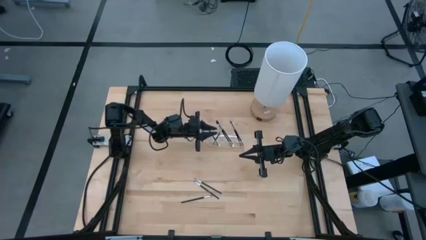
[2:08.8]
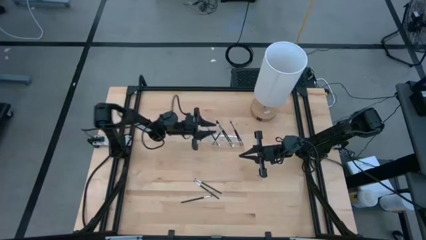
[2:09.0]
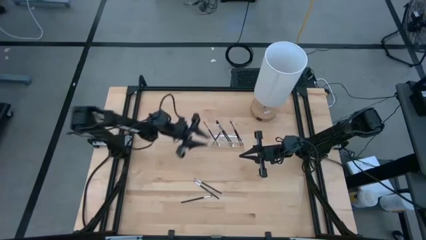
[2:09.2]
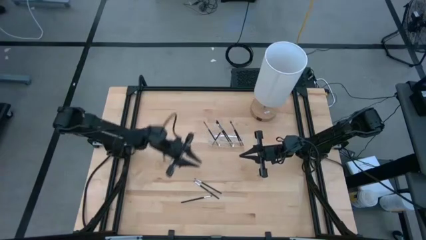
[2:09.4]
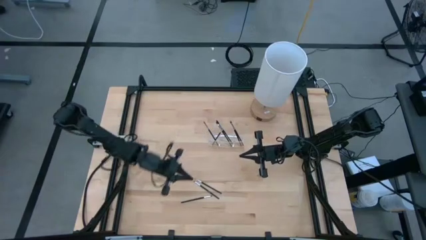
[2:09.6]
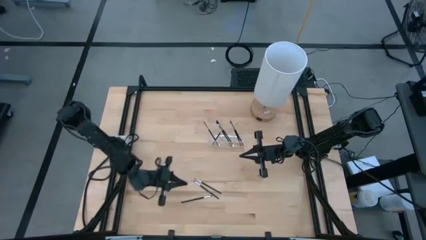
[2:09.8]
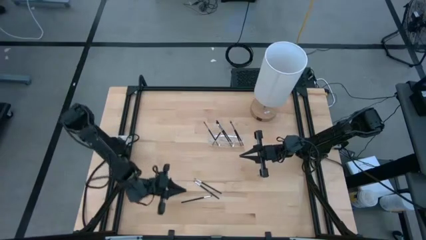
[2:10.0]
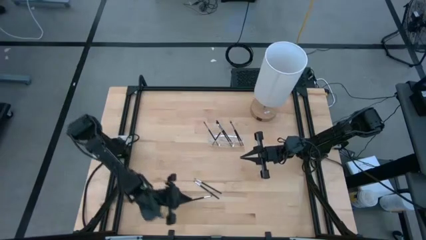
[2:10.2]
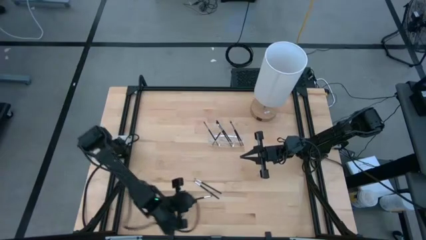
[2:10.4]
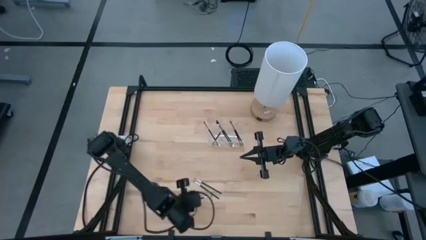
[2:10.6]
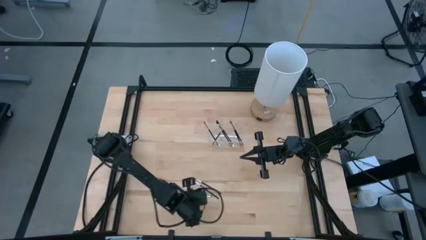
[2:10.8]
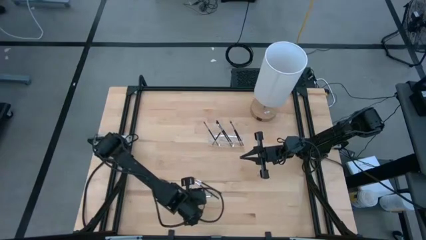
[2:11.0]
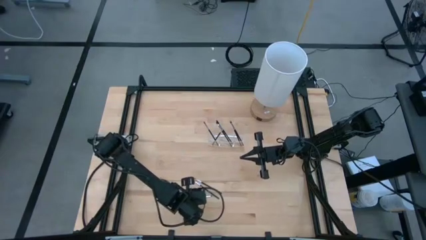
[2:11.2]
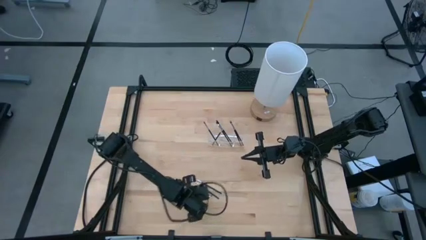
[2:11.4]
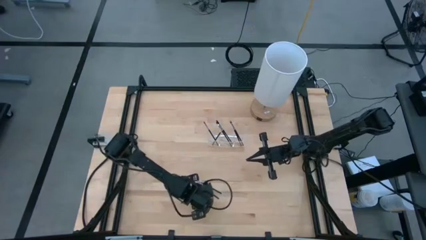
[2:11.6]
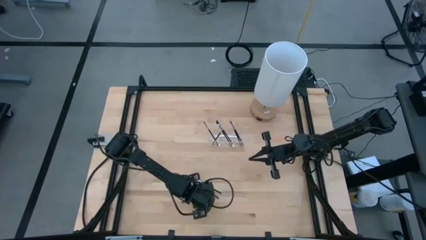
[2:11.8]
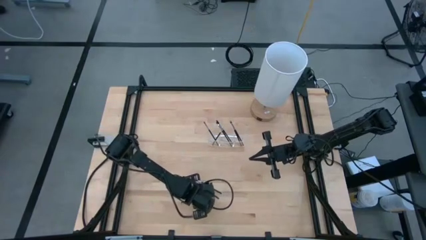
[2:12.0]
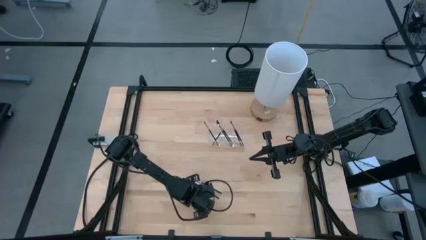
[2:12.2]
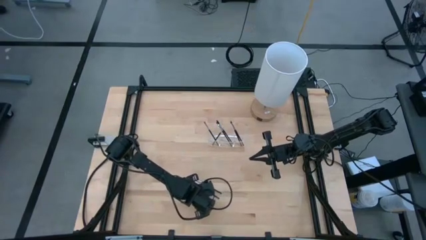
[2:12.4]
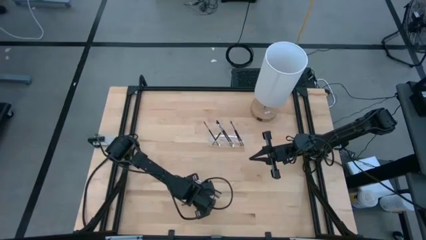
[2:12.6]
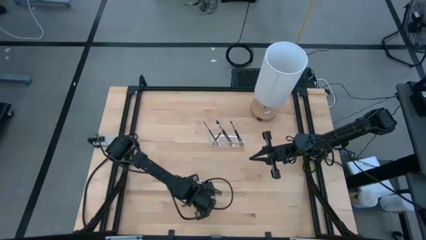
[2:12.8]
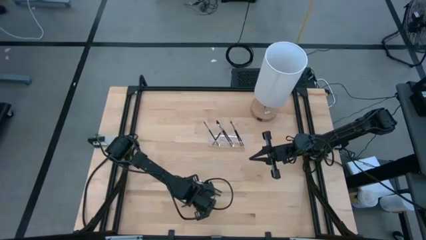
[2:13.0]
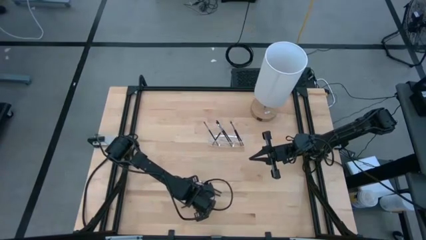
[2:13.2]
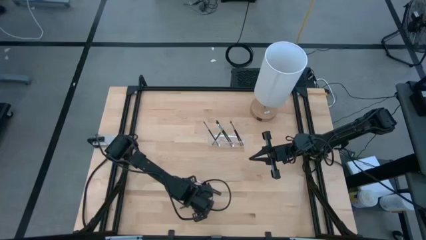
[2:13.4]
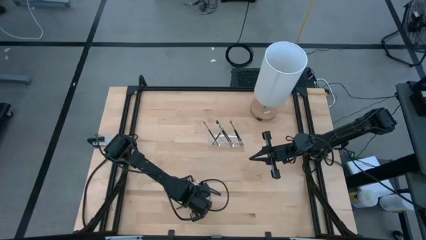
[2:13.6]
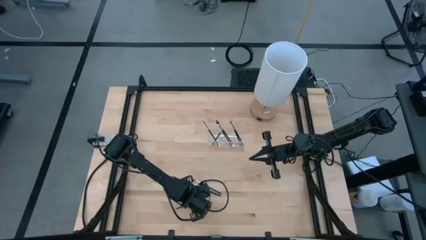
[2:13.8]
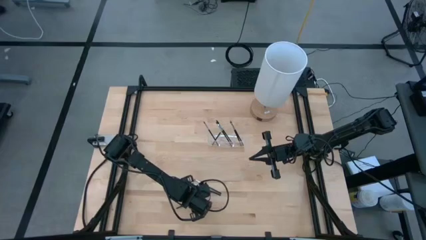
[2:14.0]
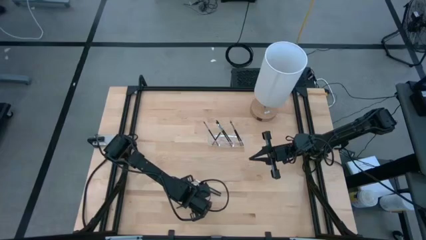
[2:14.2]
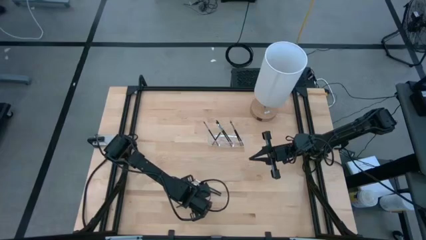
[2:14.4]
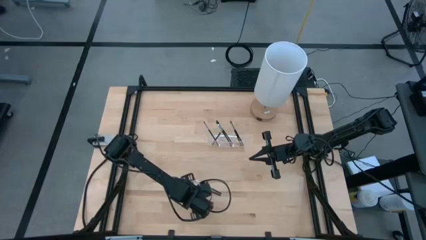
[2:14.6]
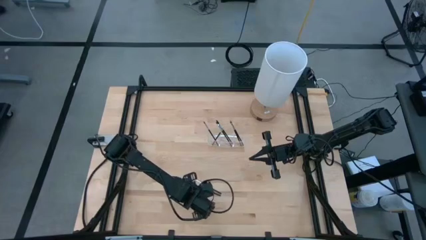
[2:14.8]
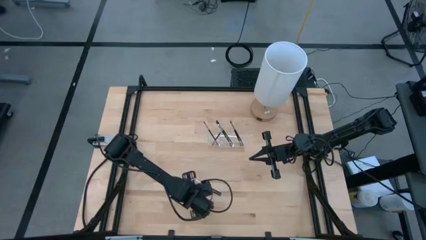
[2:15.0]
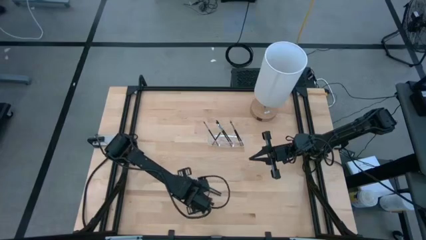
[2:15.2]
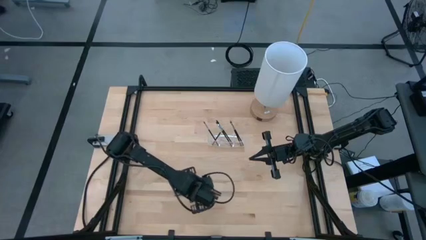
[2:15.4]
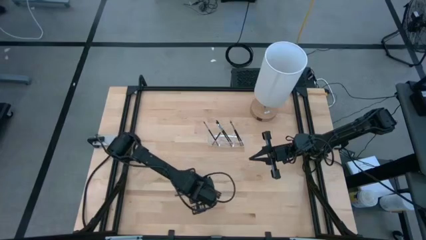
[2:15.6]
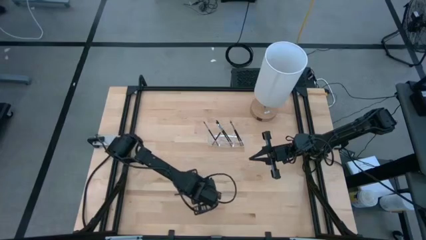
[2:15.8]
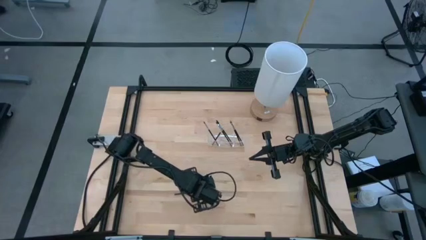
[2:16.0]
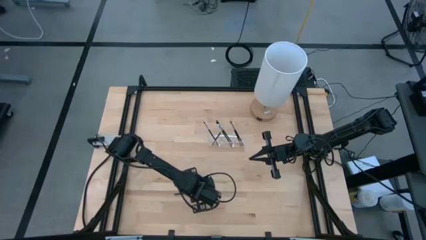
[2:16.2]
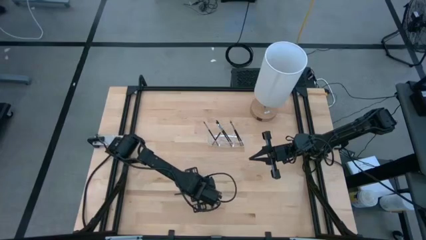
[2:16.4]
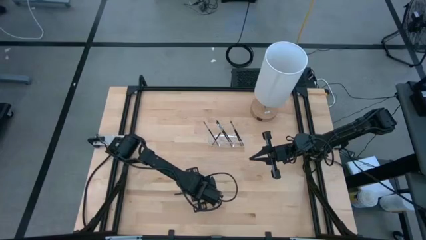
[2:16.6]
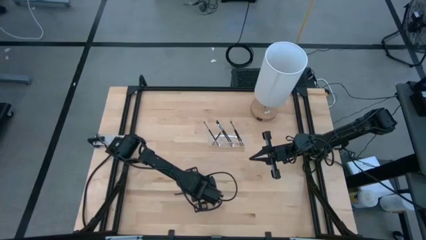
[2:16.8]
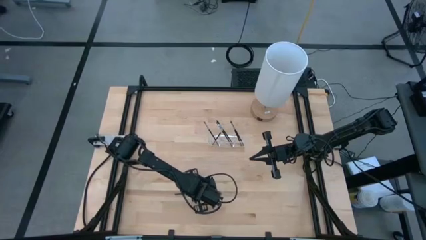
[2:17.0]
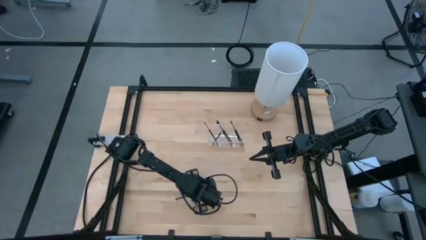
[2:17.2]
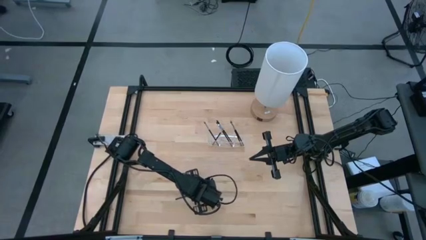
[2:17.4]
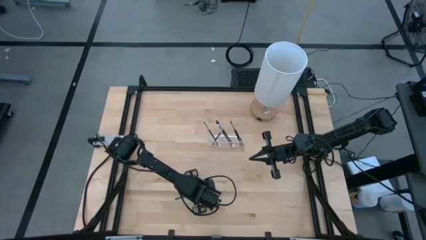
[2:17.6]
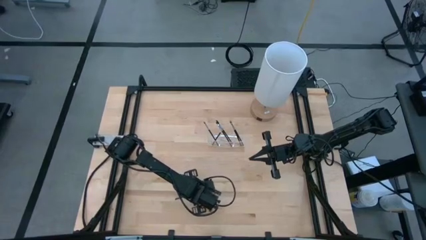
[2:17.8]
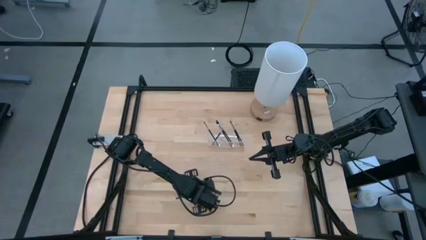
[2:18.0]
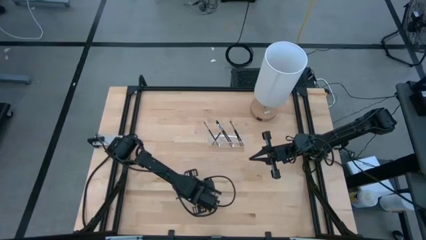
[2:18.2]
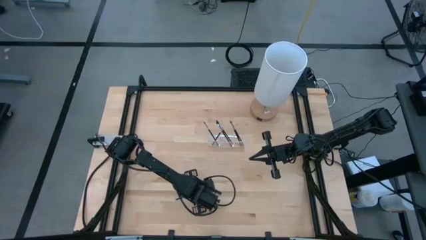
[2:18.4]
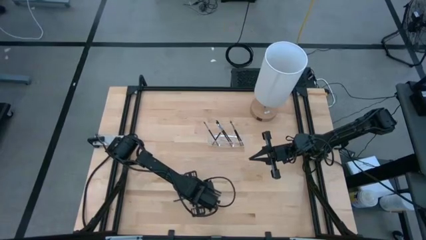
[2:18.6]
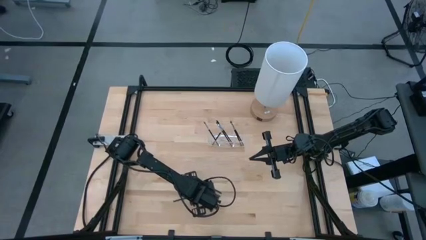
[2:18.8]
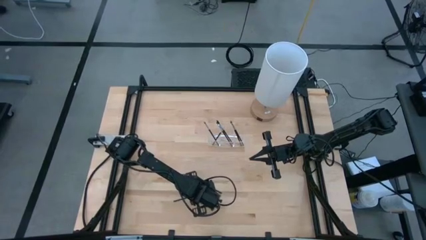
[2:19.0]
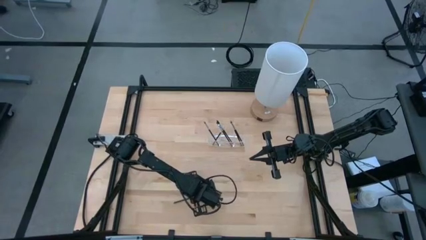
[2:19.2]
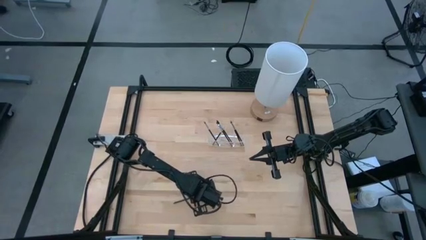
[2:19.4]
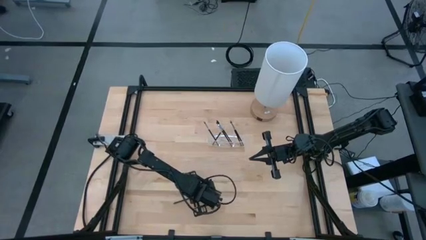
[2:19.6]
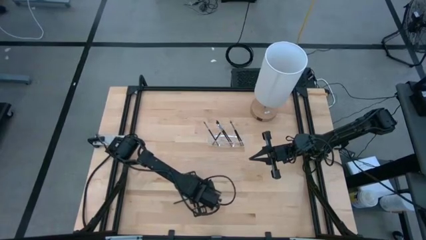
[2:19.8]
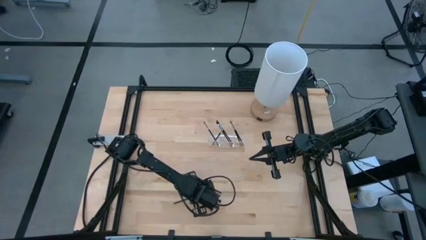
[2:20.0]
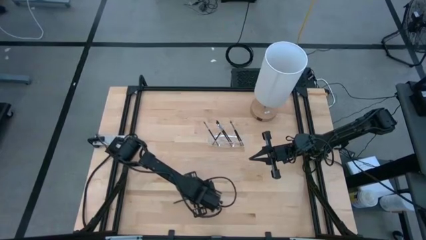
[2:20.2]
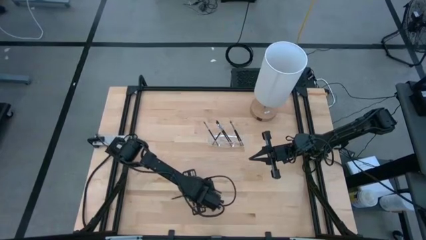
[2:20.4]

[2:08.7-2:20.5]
Task: Put items in baskets/containers
Put the black eyeshadow brush into the left section of the transparent organizer

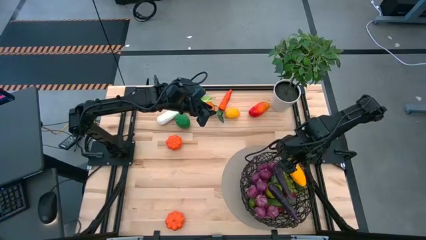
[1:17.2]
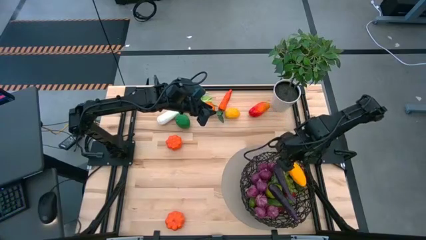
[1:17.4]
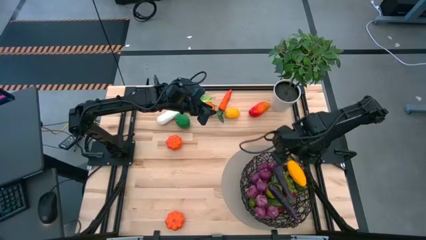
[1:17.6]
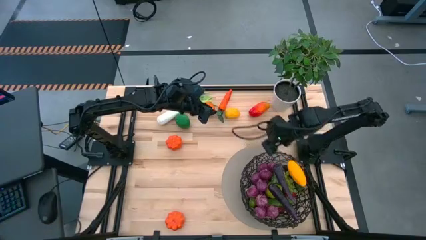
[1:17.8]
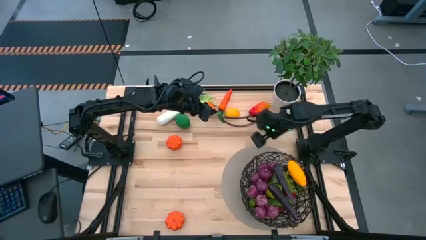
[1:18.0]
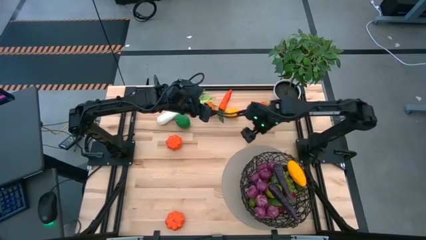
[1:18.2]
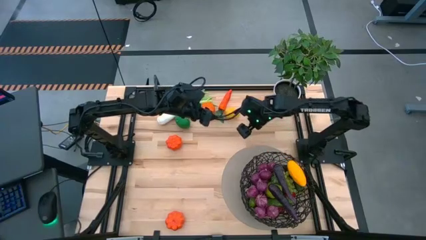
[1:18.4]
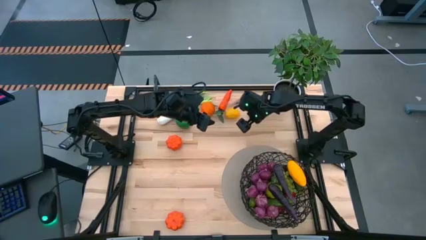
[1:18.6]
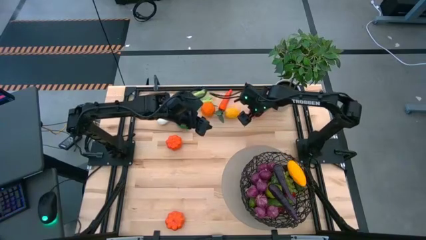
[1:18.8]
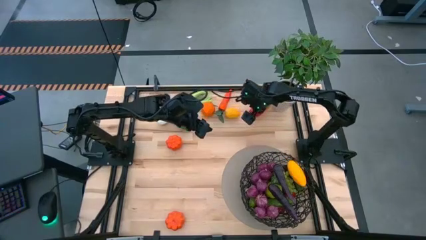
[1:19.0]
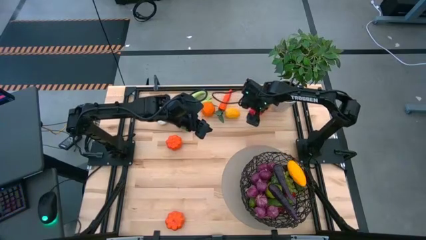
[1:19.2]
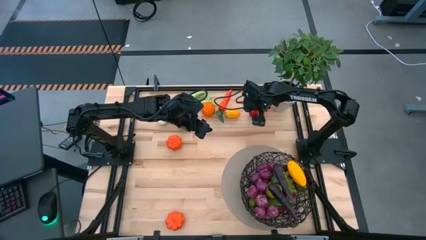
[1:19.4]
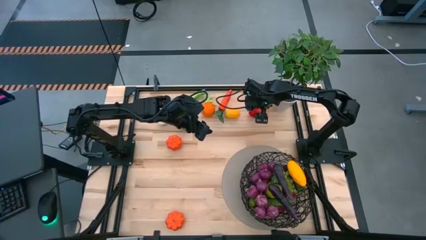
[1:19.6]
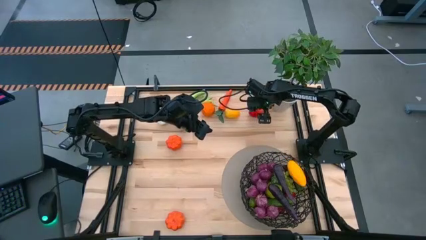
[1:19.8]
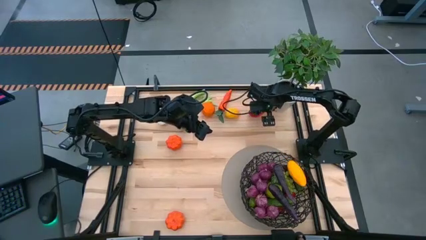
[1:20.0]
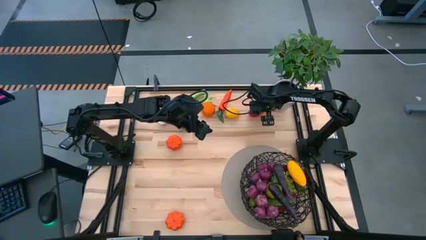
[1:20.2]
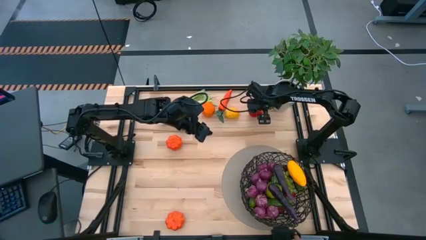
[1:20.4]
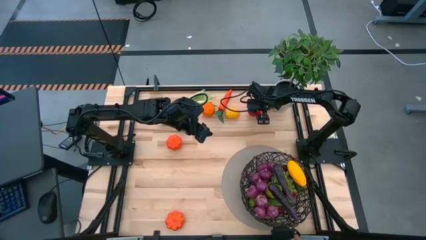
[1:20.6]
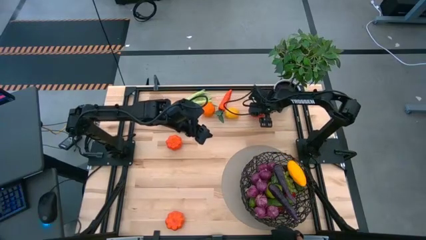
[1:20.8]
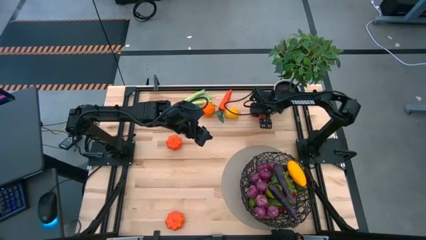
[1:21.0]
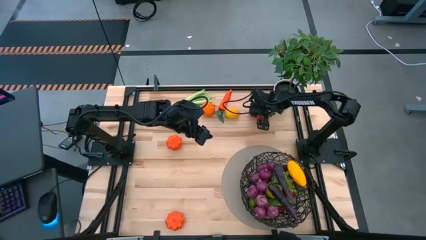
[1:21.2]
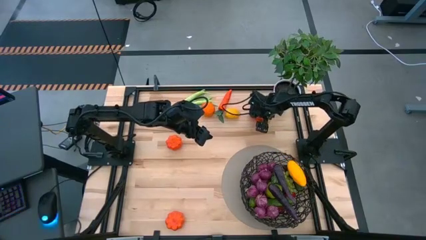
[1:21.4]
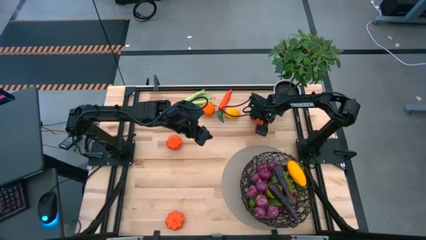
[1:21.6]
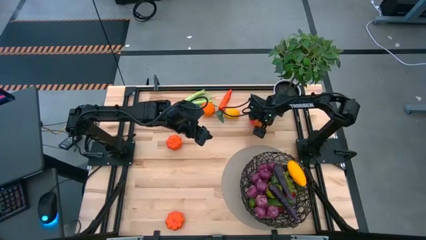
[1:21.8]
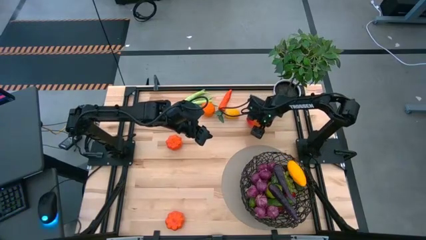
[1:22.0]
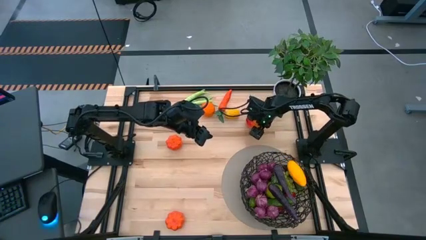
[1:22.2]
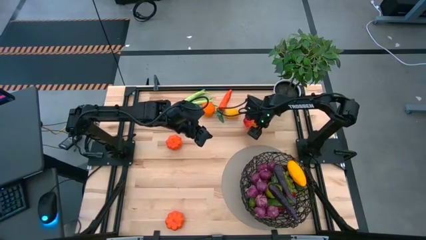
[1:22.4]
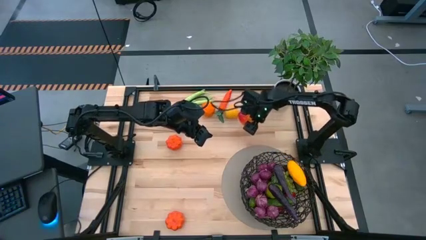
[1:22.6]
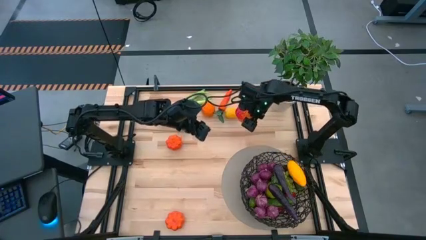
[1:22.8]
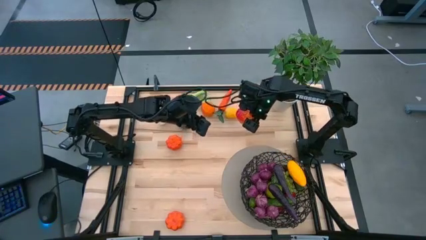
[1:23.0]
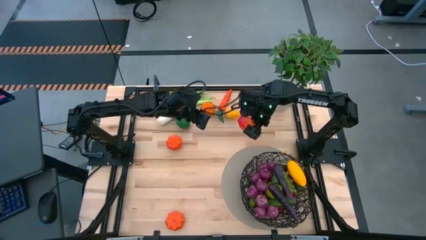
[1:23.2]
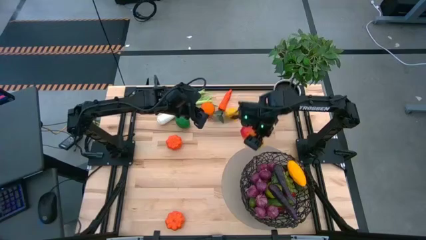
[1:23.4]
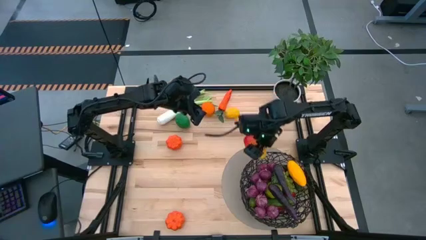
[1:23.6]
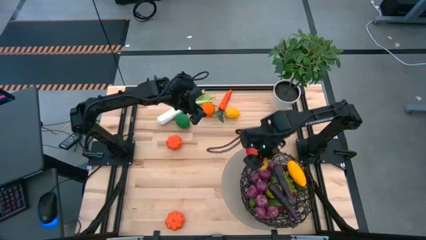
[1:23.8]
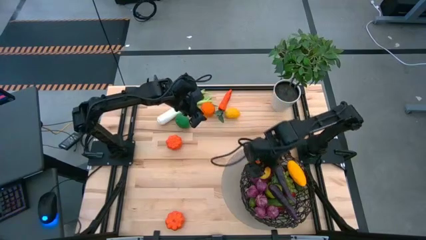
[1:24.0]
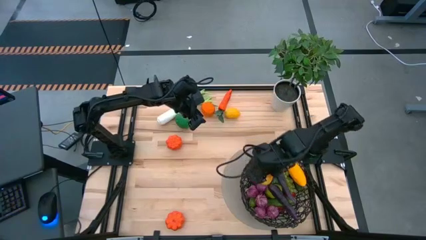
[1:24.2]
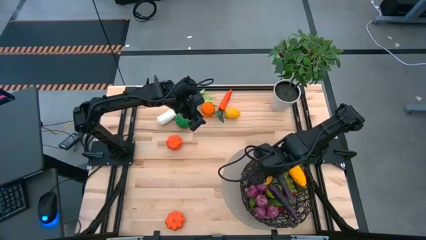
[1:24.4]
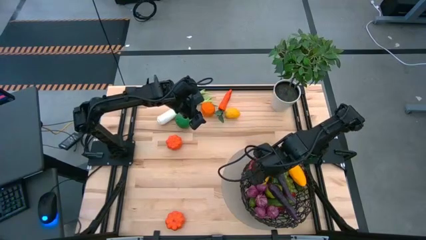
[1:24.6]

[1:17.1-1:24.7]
Task: Build produce basket
Put the red mango into the black basket
